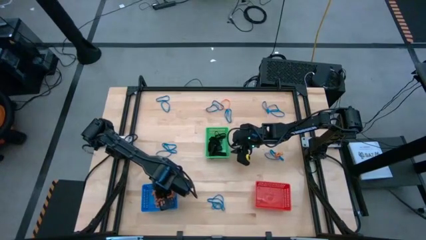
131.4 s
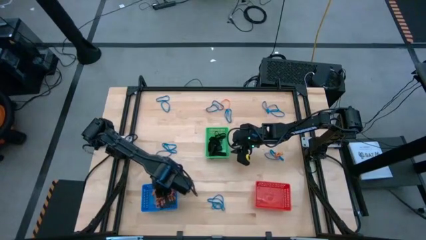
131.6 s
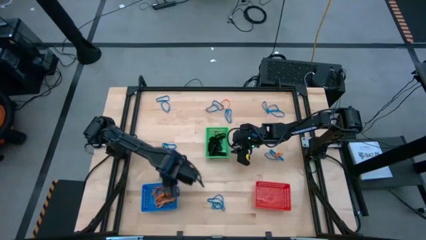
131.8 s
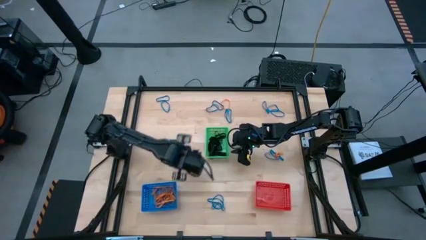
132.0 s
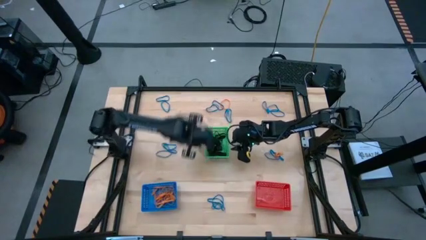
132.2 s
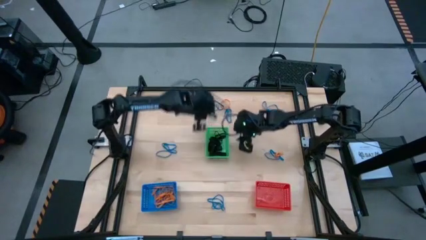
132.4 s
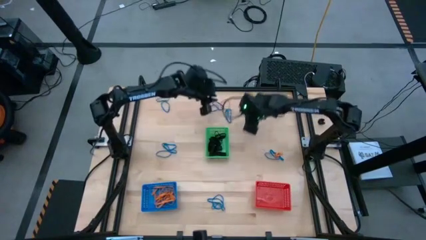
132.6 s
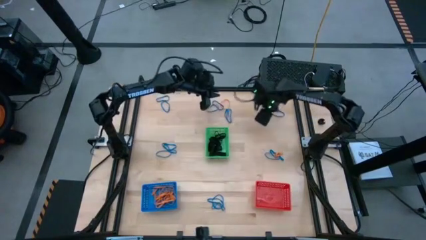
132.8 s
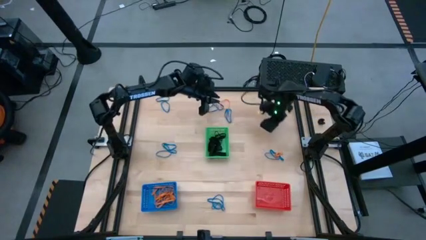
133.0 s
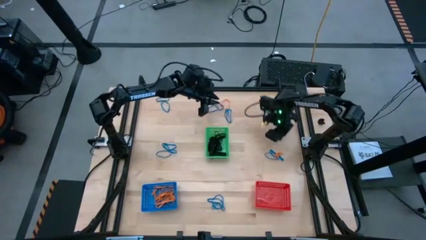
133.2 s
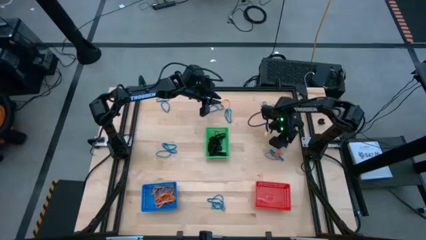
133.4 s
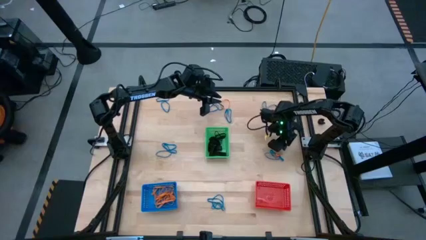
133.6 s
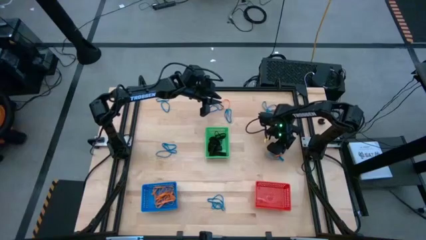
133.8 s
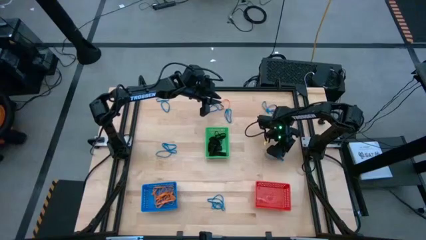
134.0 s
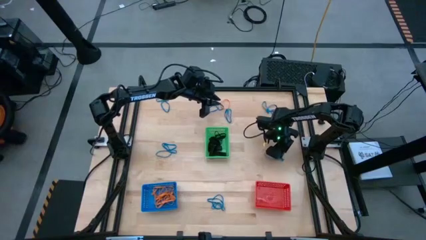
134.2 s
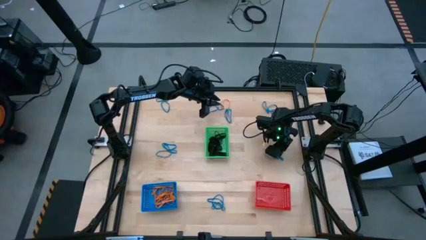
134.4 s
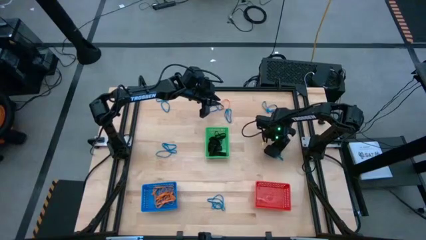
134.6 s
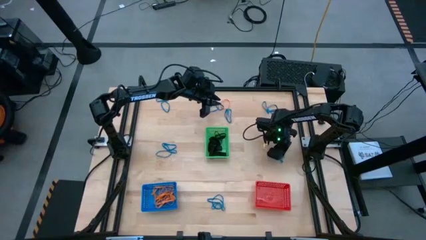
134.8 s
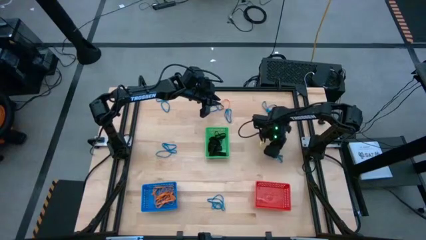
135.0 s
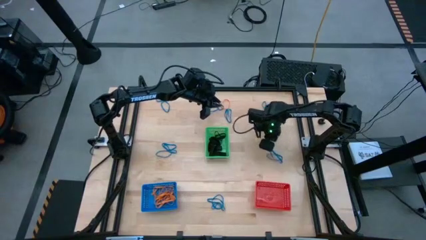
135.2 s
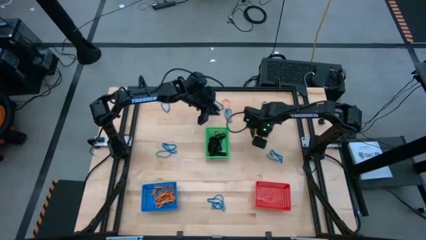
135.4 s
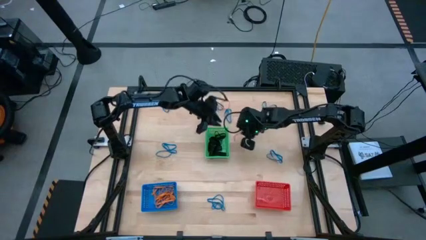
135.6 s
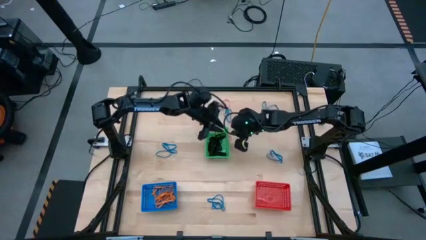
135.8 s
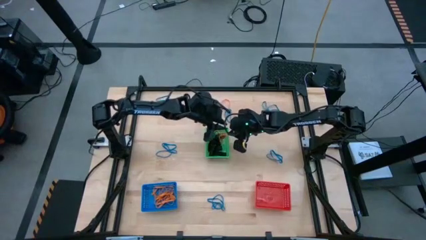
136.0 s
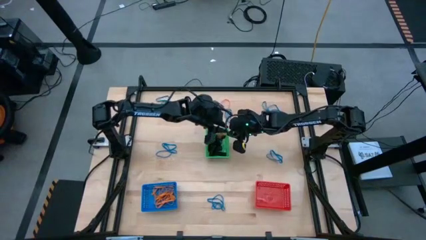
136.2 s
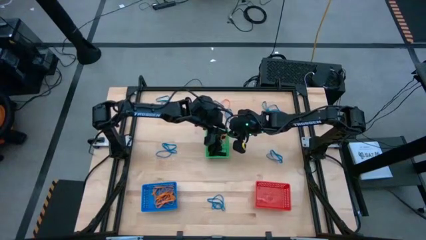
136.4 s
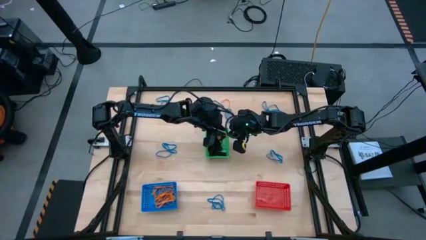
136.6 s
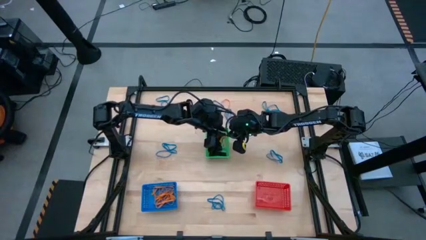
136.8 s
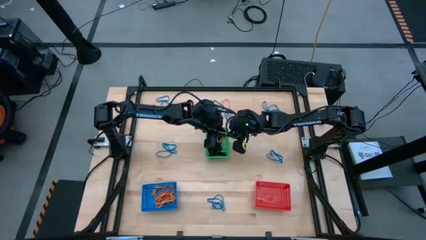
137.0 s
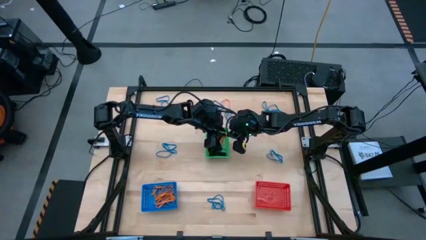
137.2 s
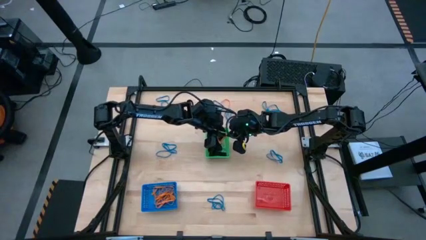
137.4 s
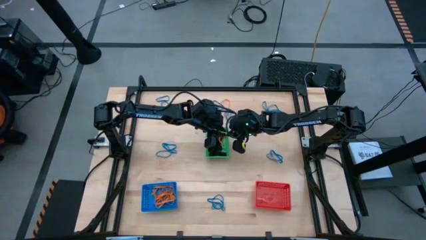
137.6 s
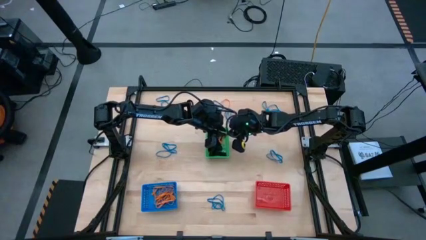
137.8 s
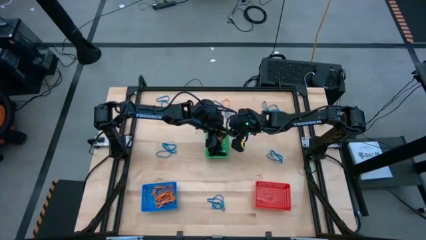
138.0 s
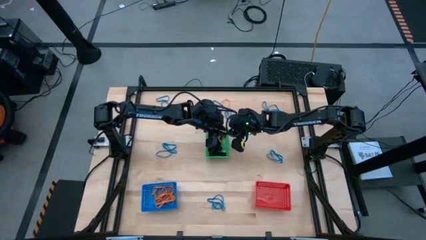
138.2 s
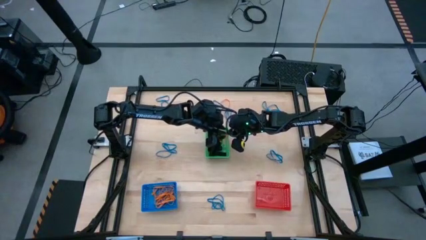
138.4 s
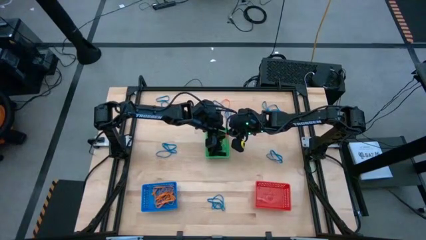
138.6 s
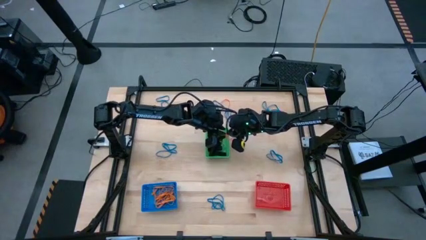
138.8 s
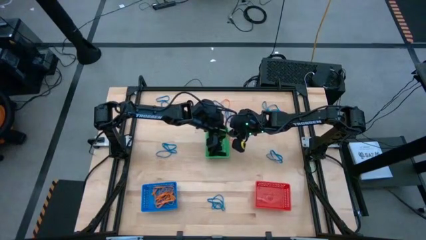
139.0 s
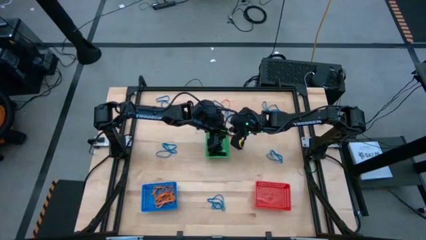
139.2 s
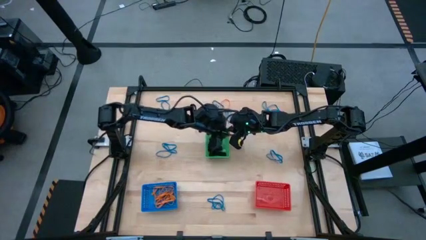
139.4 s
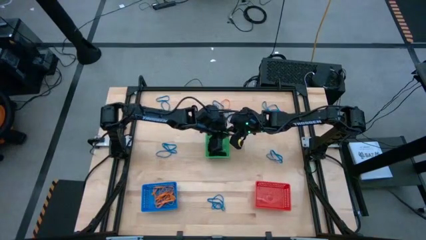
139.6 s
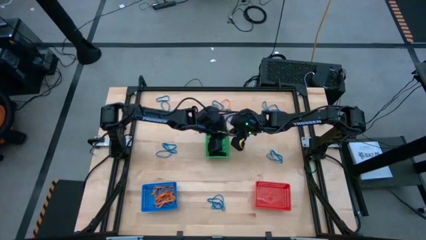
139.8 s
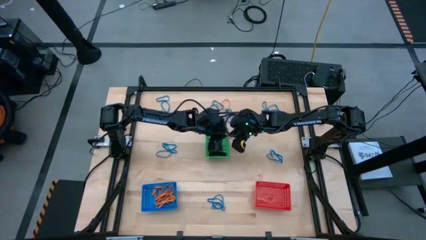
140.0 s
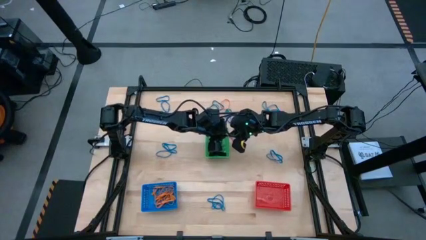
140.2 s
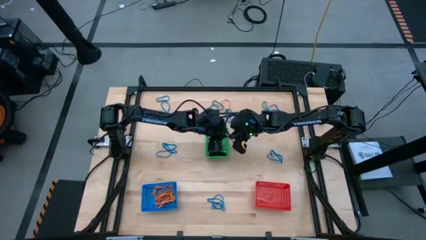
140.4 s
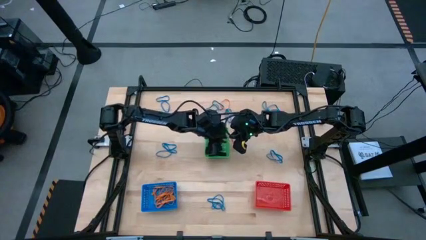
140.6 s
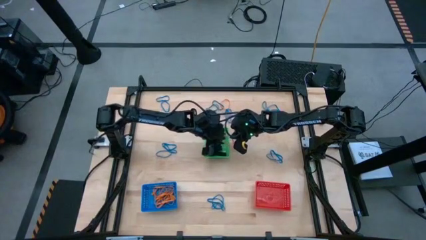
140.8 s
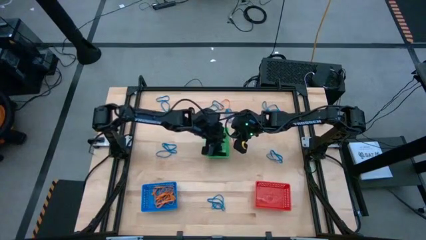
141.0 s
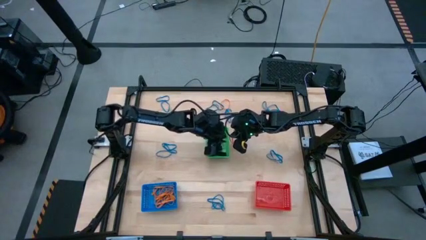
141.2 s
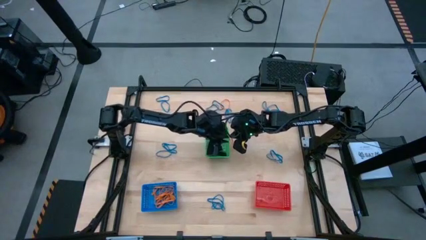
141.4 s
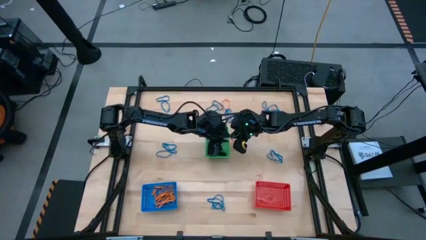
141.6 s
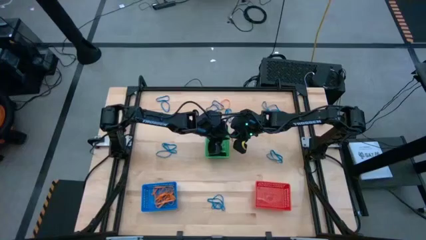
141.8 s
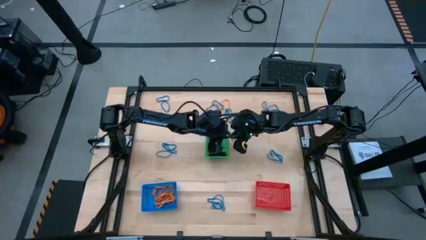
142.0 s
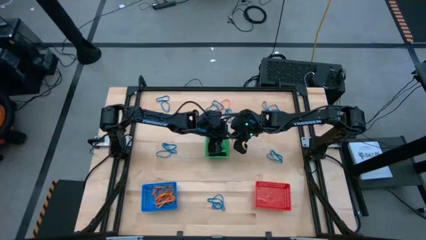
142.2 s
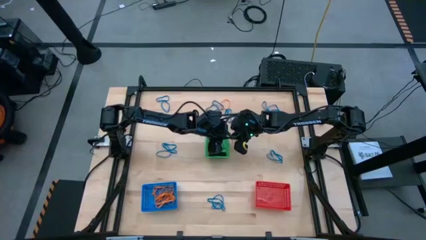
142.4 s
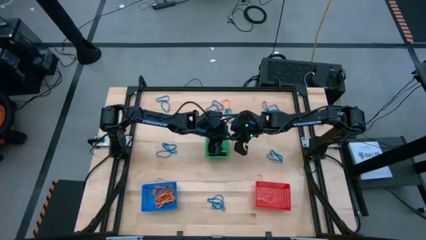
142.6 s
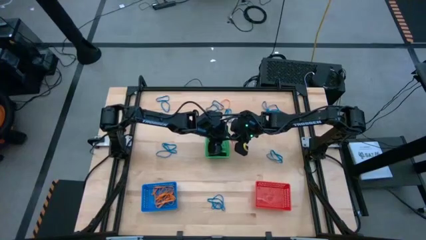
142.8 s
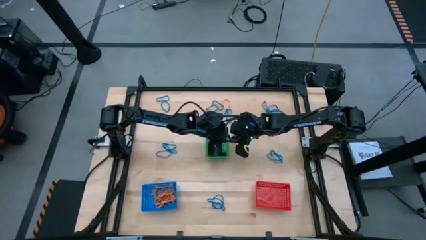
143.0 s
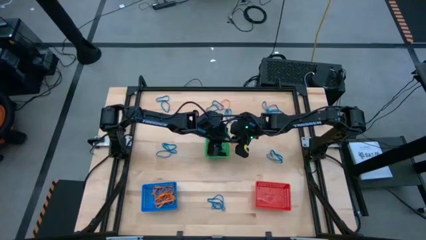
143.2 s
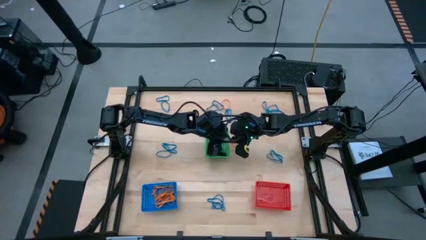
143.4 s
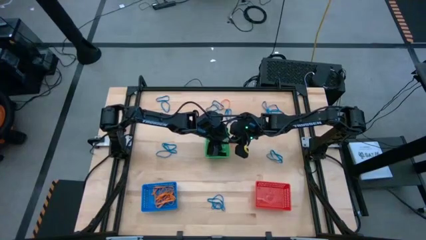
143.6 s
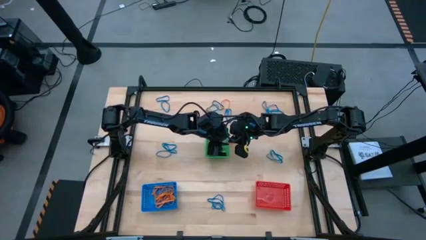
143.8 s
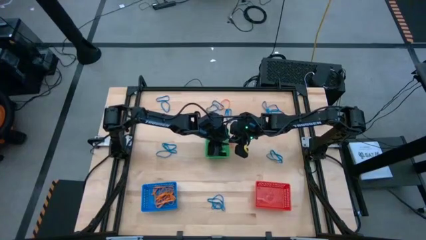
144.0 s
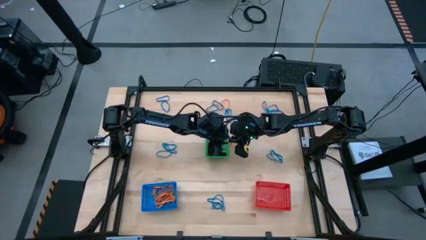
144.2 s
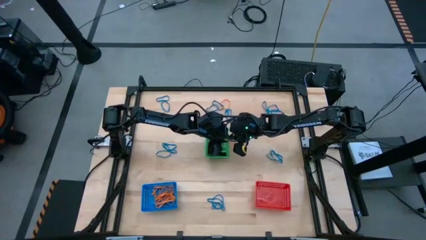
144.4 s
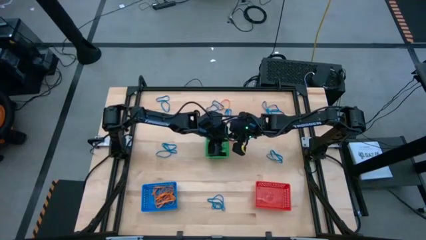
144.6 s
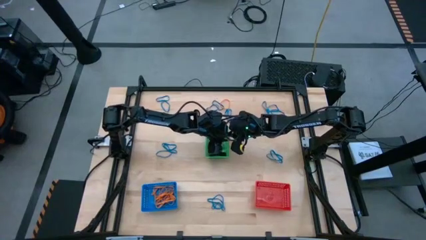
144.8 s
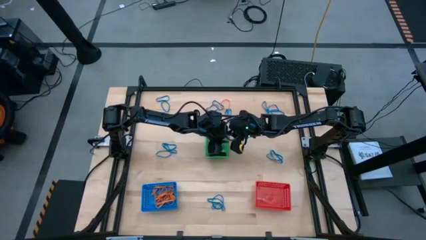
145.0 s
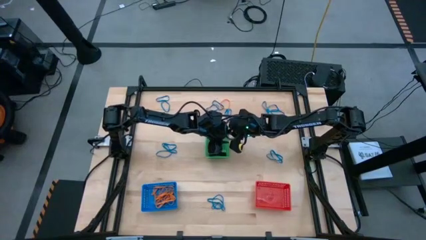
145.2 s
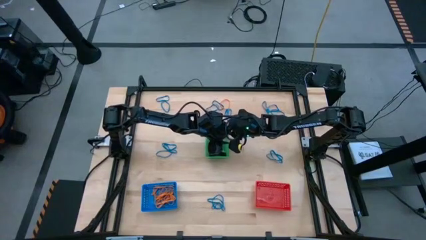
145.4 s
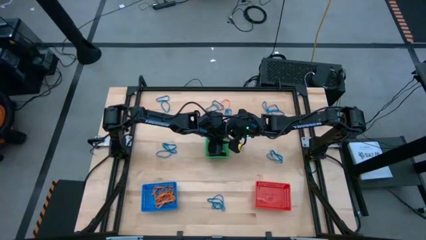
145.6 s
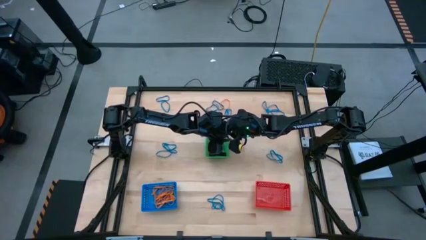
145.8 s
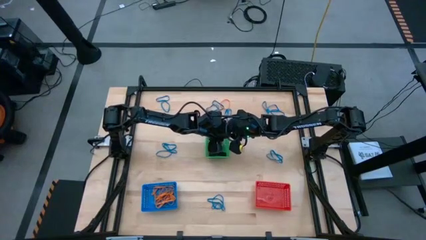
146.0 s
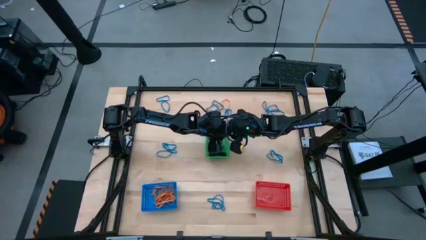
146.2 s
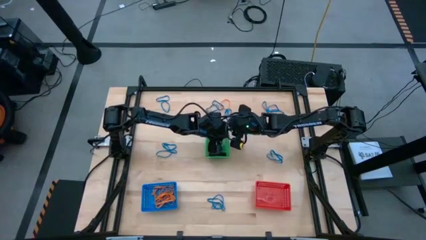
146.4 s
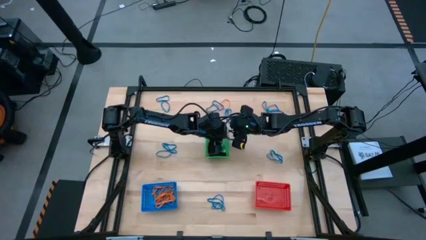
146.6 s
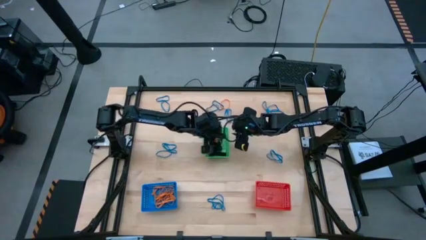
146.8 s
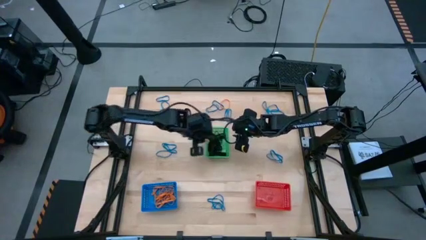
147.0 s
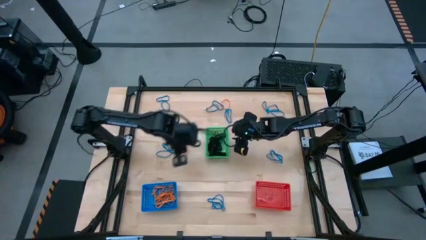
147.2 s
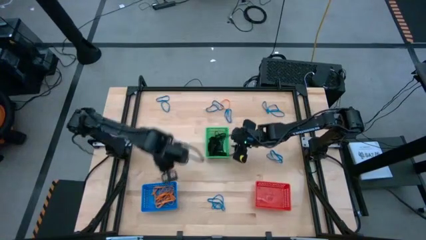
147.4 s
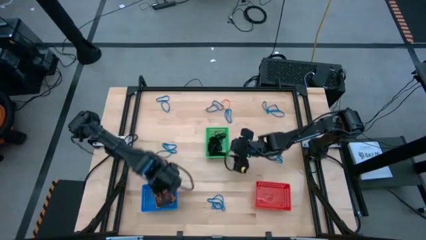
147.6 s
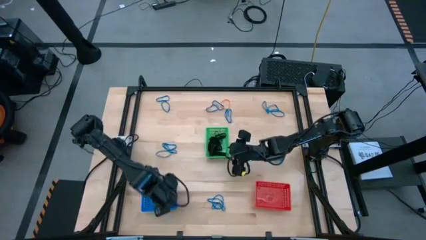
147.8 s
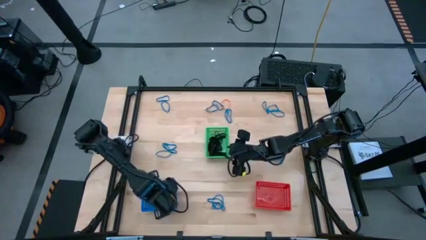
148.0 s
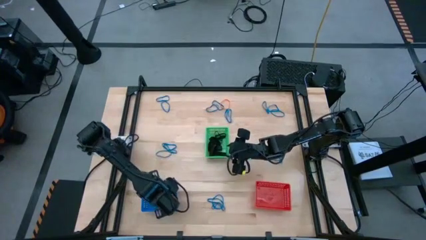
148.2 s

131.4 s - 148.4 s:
Task: Sort rubber bands into baskets
Put the orange rubber band into the blue bin
